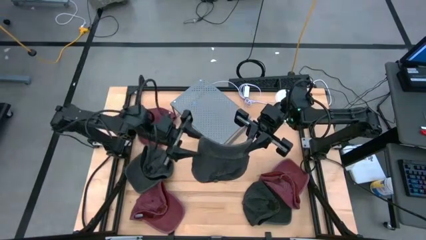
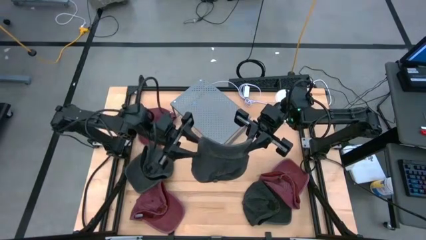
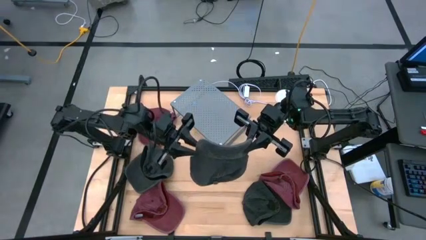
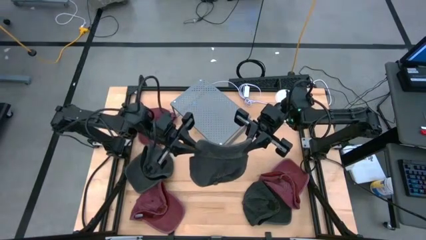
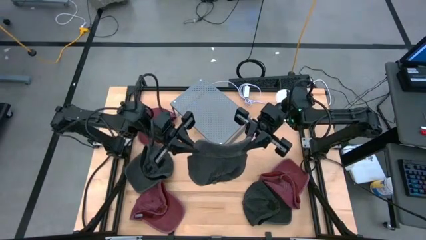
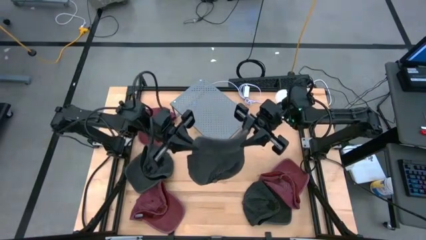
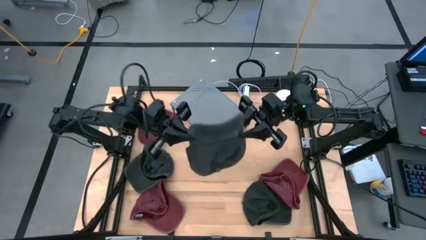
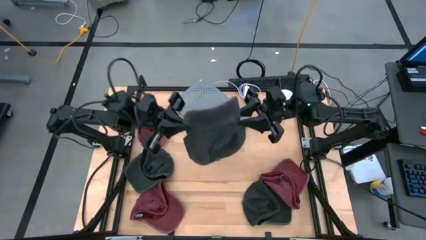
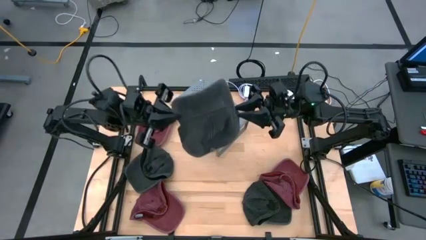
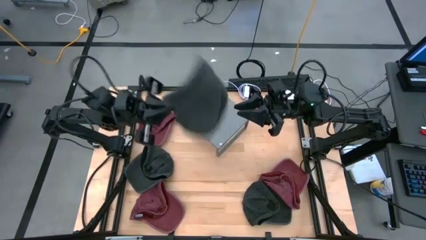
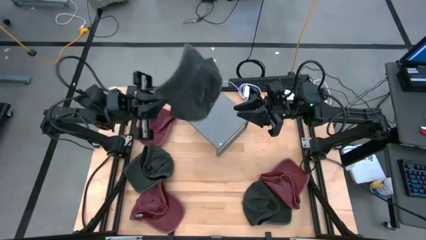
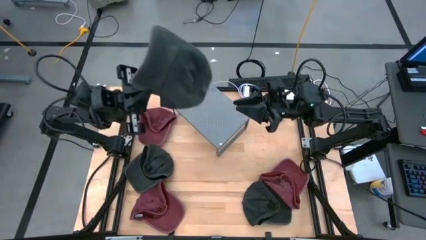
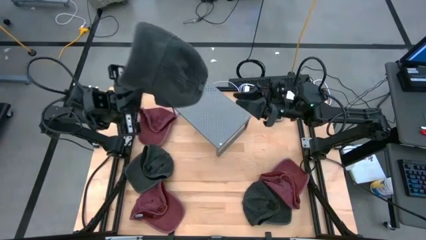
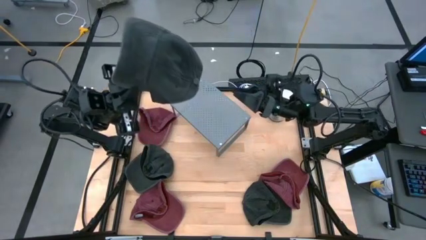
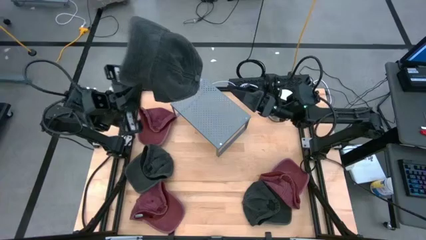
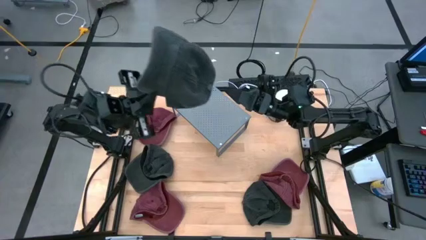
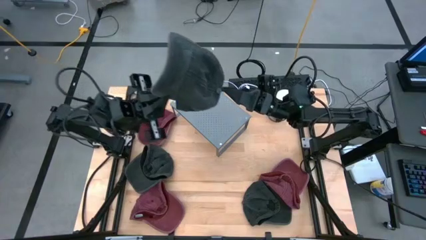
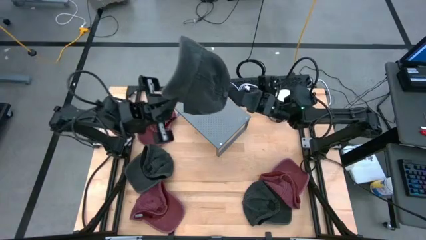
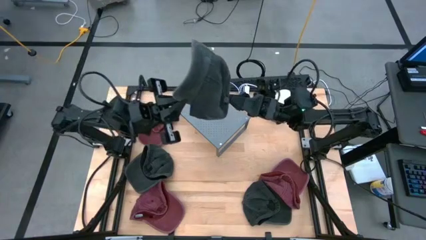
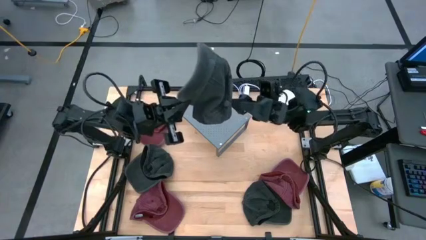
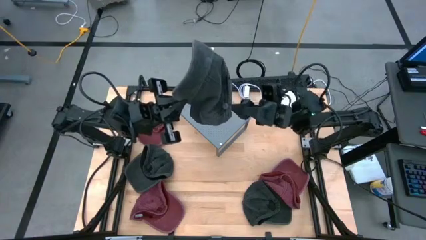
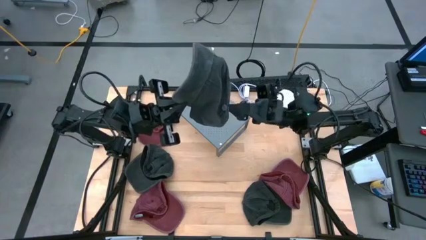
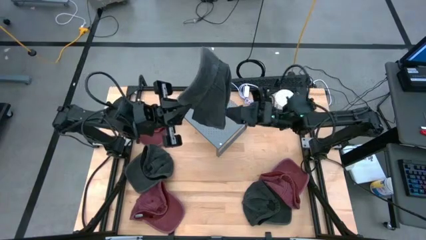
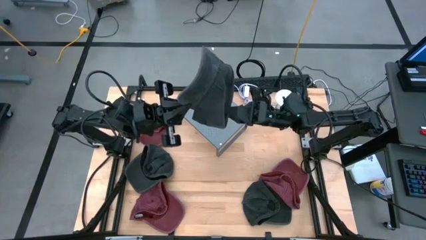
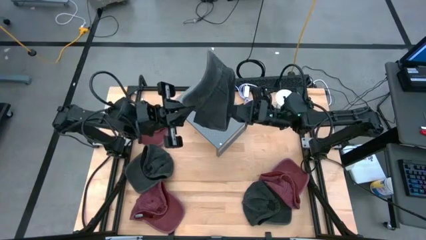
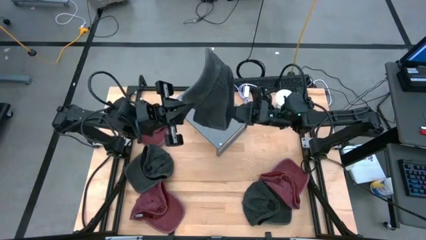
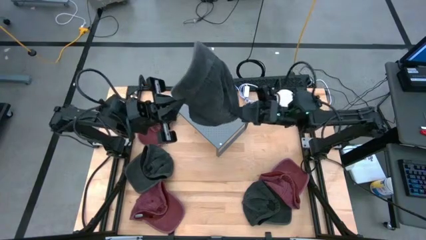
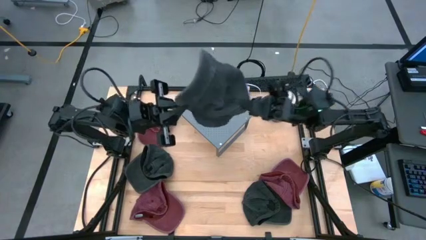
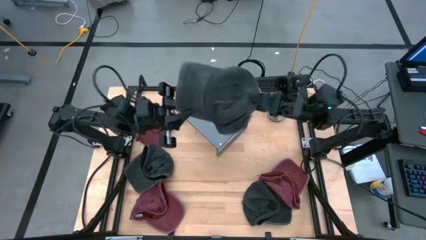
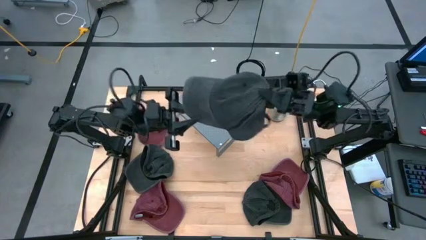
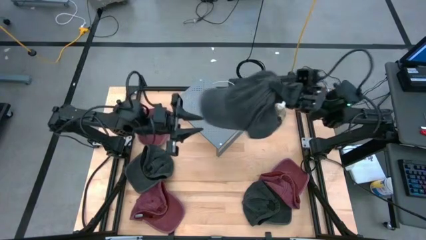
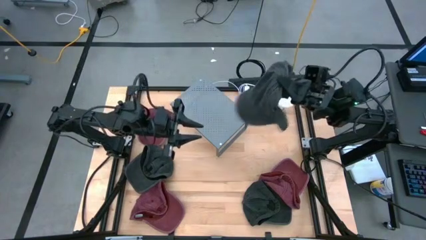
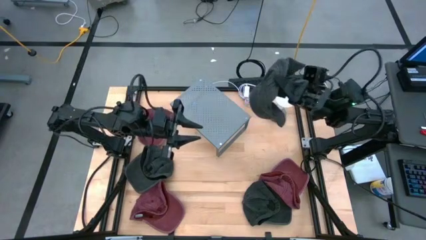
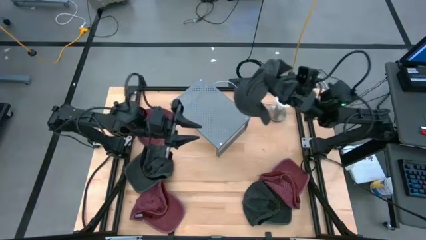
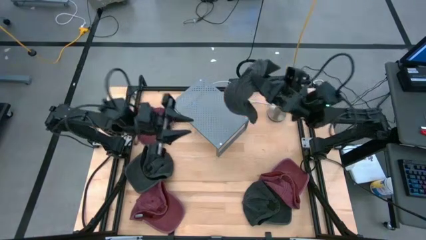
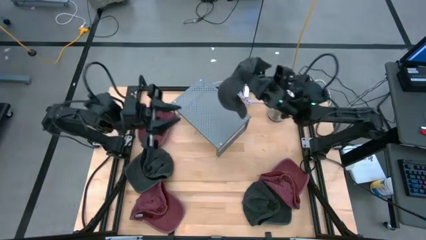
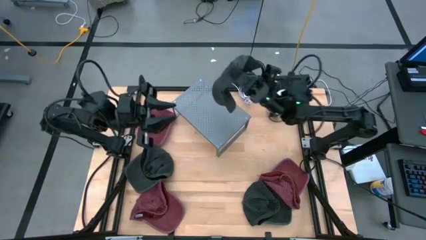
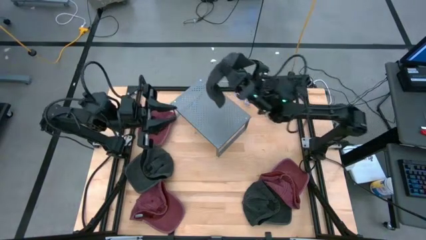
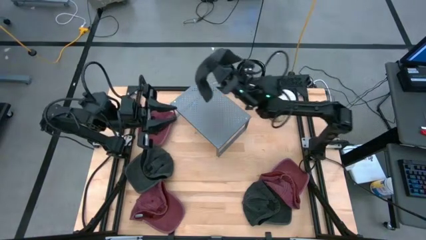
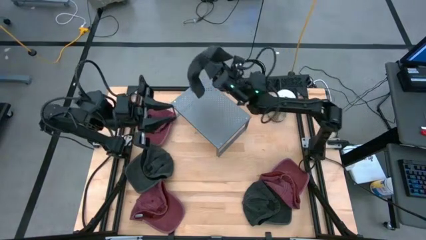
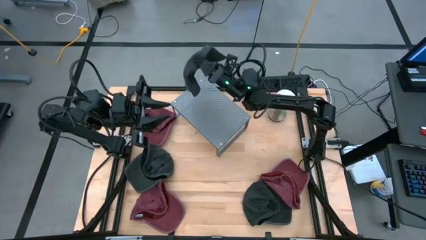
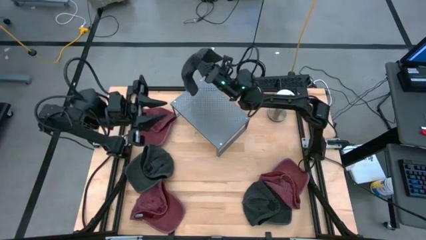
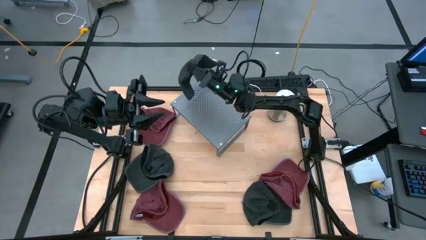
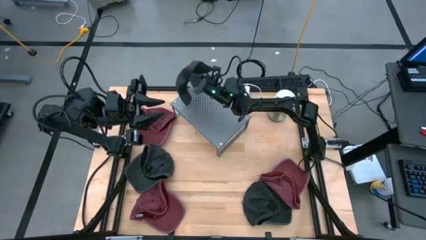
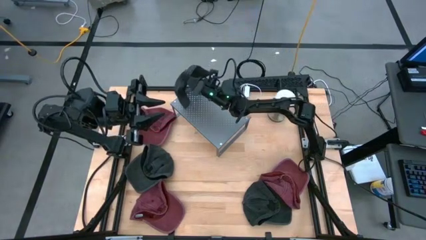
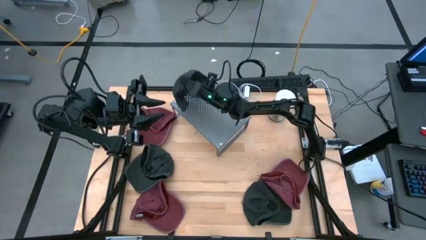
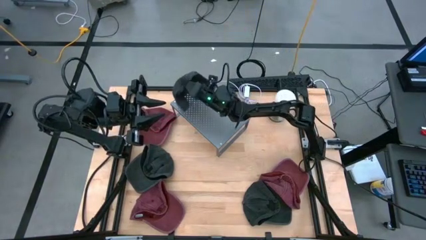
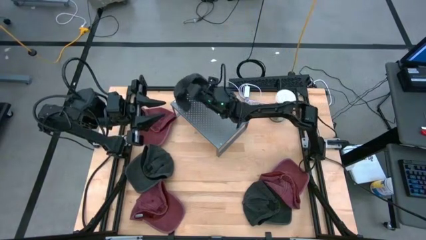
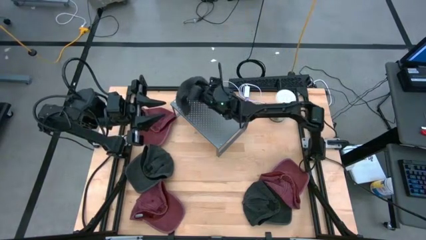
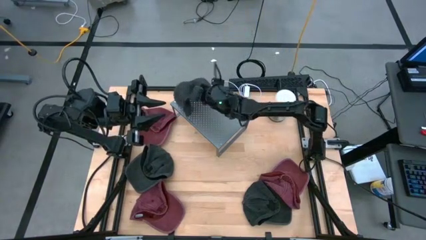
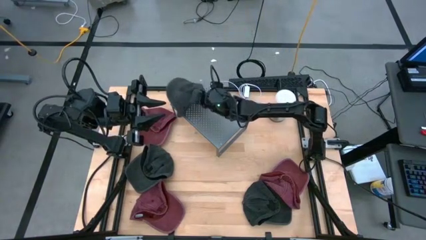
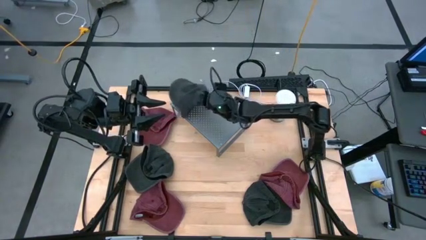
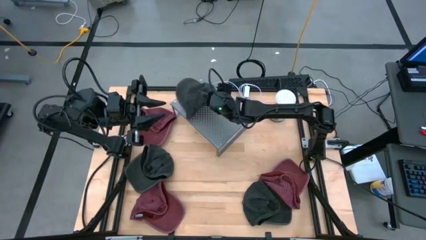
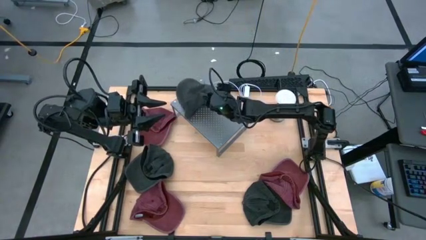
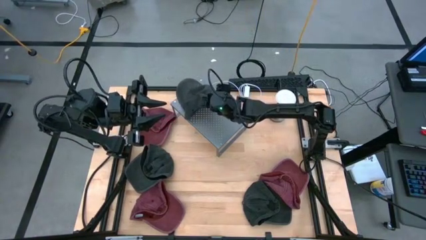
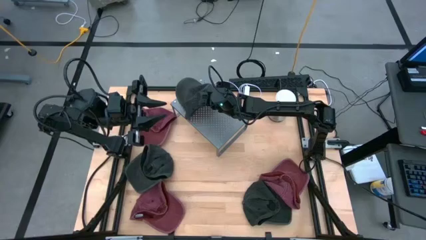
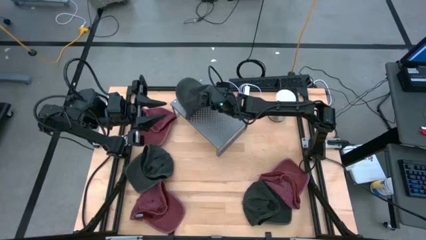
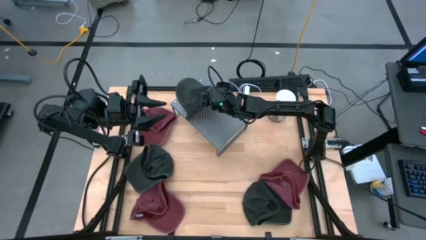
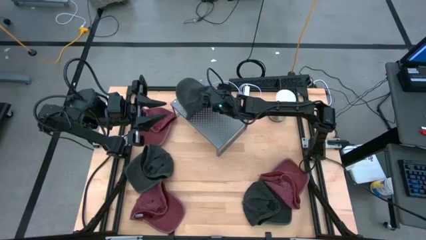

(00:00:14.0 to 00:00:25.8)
Task: Pick & Place hat
Put the top black cap on the shelf
